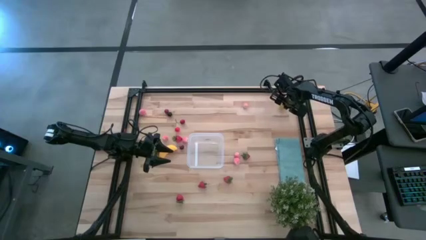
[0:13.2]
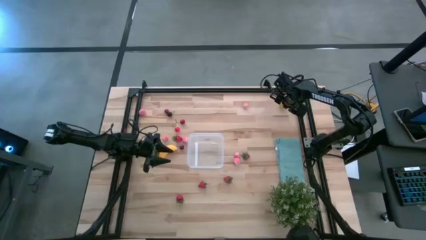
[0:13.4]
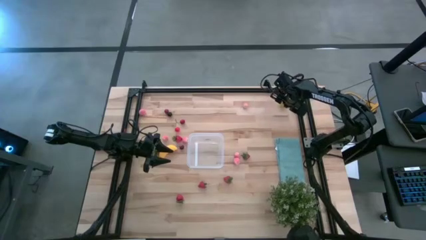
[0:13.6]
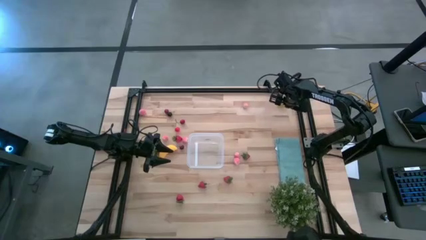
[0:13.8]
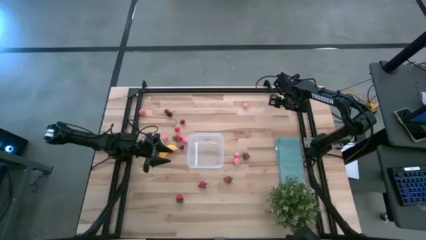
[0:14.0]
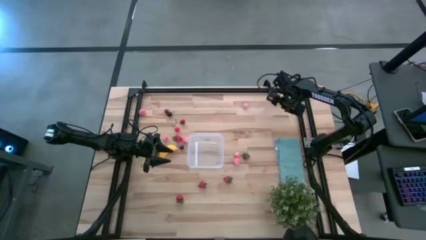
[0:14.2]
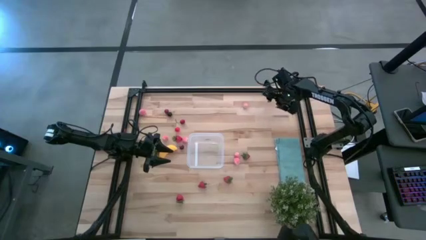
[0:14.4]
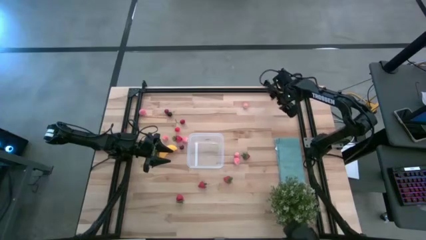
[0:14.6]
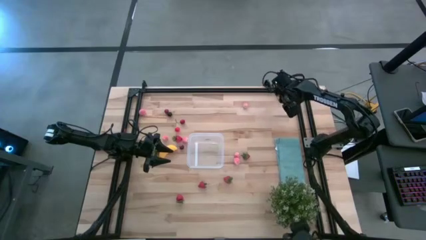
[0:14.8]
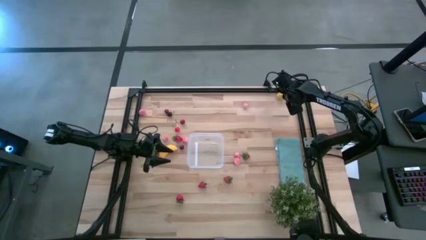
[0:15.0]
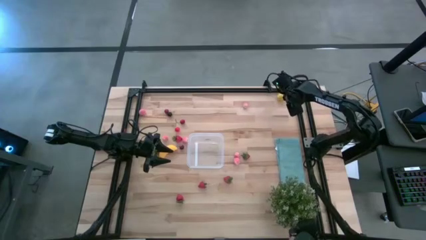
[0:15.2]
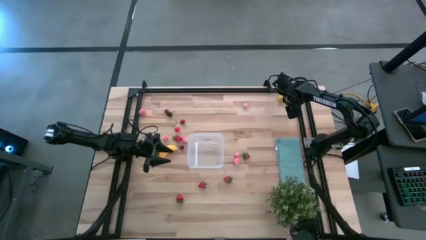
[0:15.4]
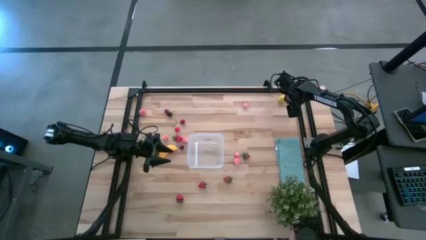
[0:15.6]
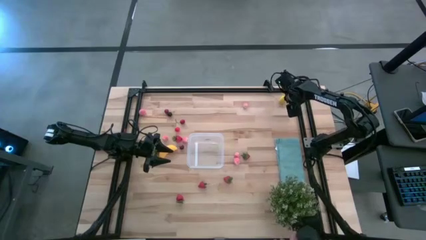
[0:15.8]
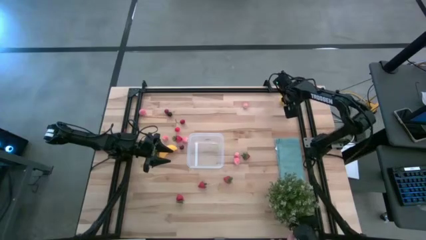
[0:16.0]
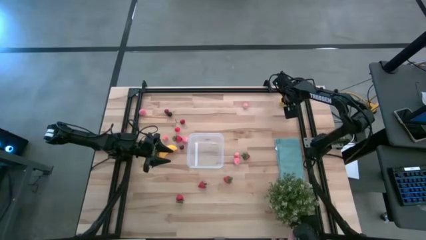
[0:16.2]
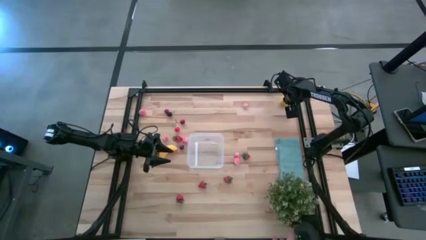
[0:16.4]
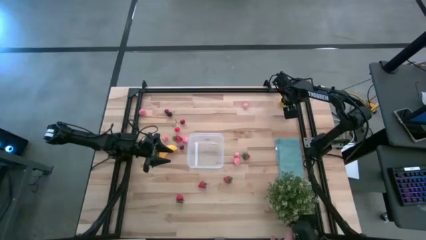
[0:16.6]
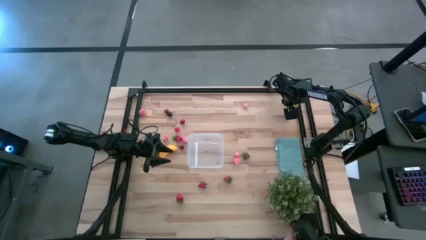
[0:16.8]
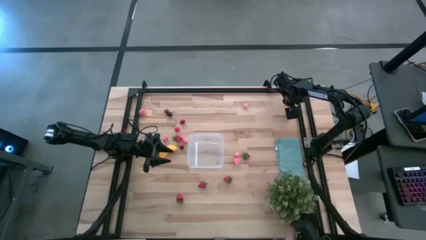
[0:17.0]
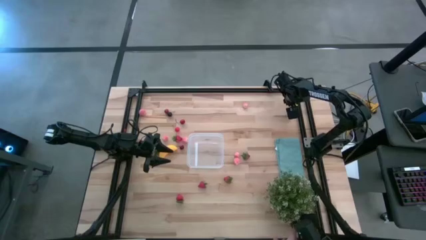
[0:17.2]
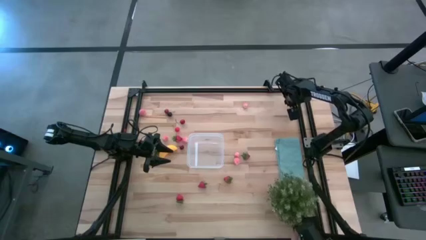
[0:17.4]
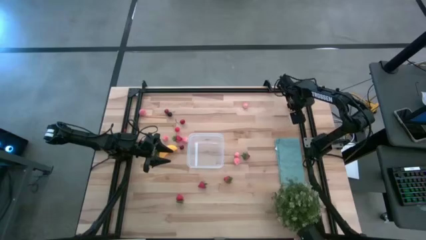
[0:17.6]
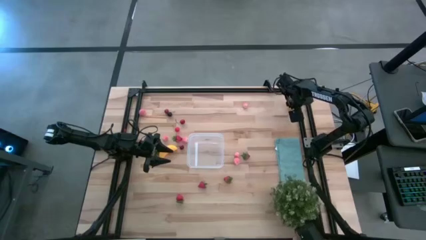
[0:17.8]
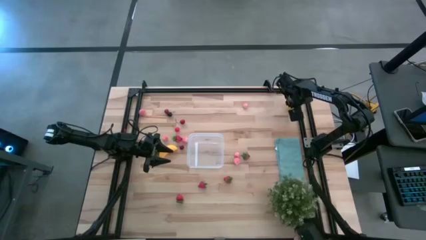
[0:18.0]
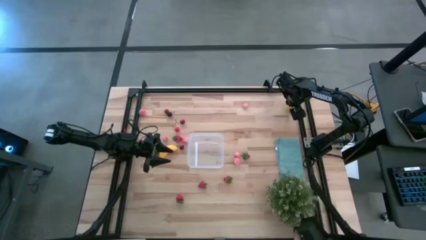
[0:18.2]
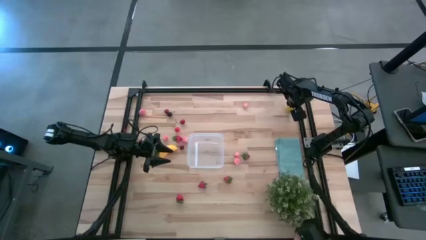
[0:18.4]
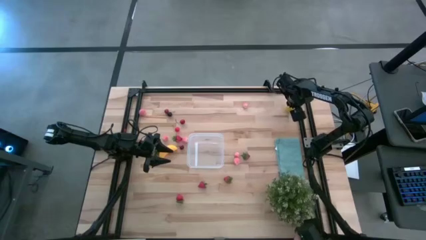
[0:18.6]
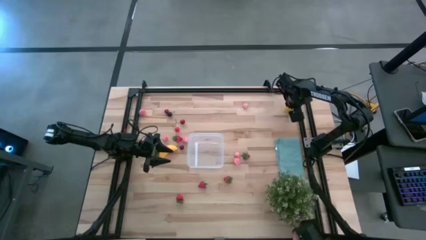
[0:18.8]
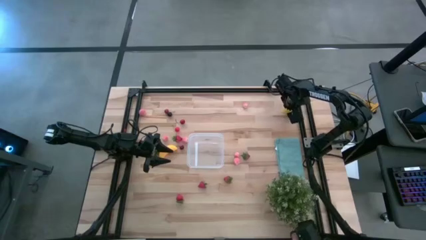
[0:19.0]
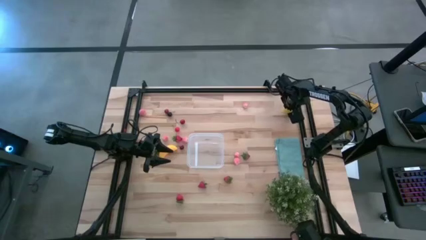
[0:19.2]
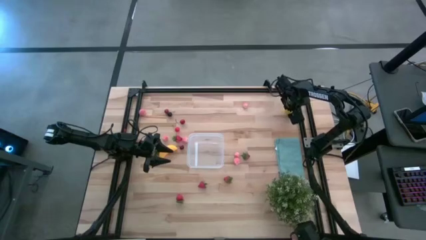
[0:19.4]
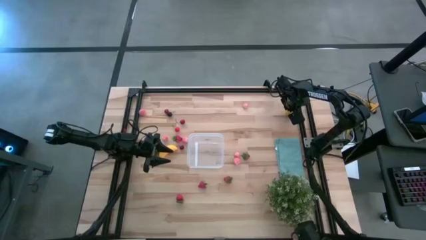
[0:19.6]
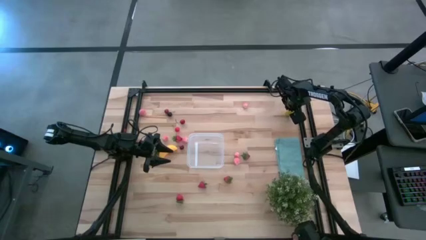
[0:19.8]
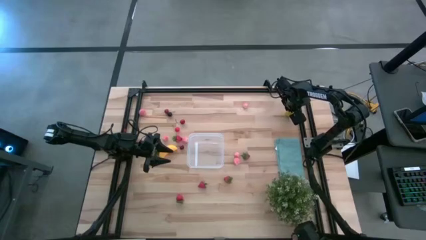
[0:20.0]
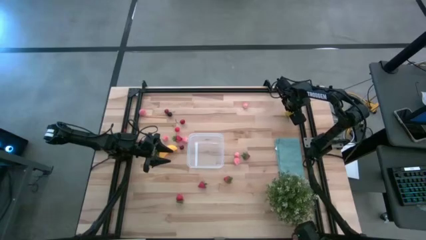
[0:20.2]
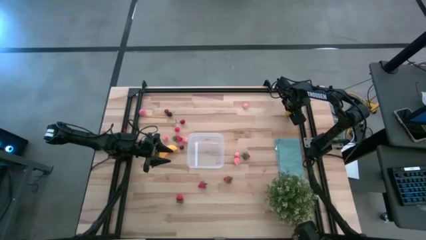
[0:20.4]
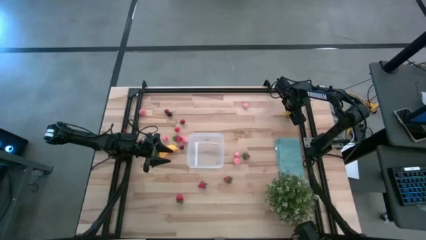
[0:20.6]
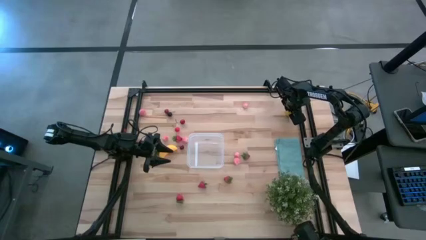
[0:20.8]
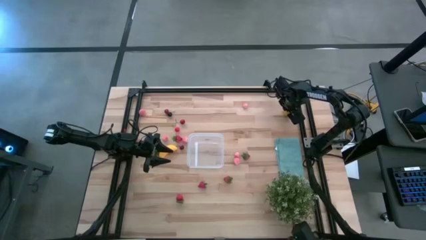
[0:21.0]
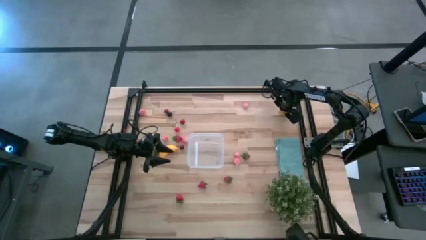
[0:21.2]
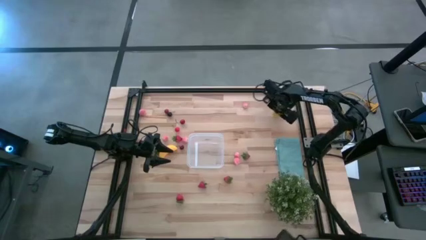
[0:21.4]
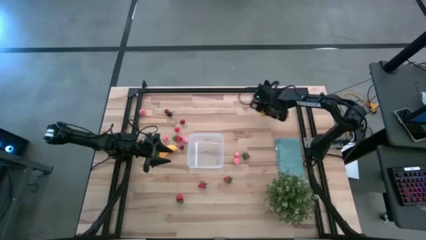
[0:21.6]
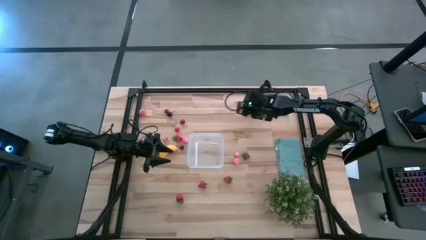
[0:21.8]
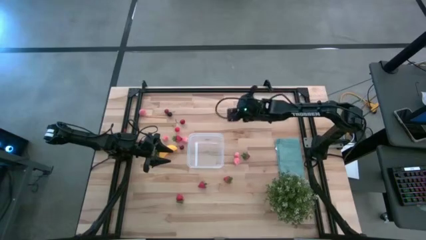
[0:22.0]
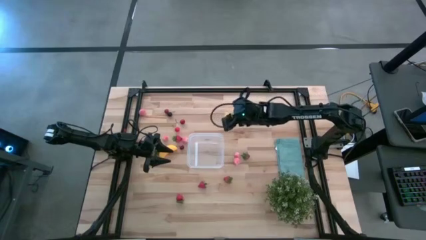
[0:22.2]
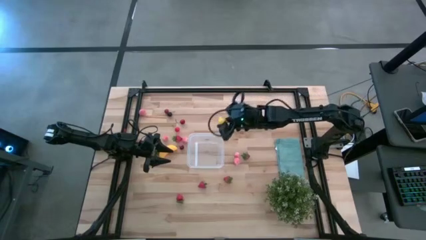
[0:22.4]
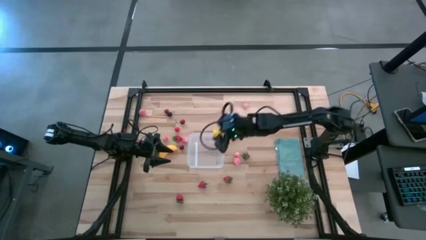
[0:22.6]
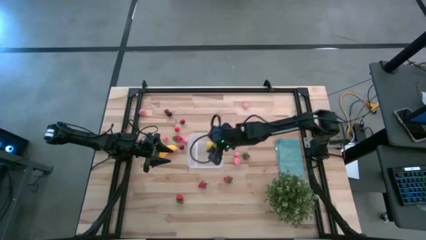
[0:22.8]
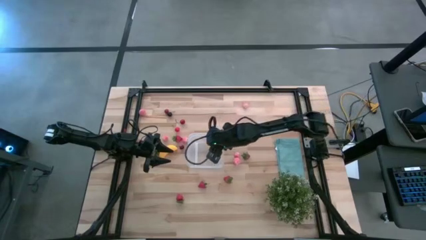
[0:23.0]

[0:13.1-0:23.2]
Task: Pick and placing Produce into tupperware
Put the lemon into the transparent bin

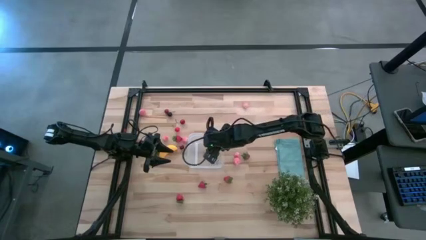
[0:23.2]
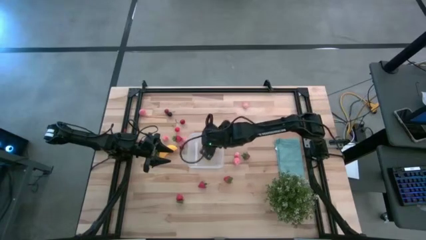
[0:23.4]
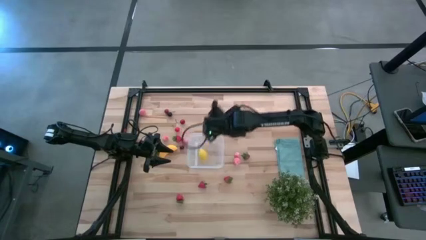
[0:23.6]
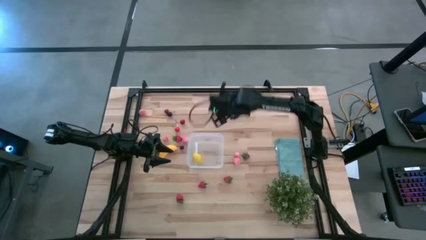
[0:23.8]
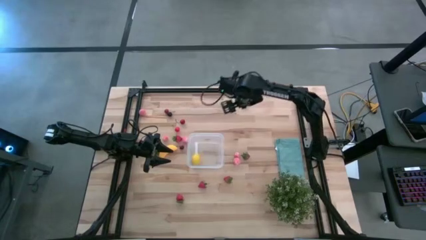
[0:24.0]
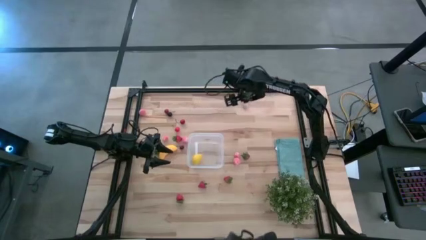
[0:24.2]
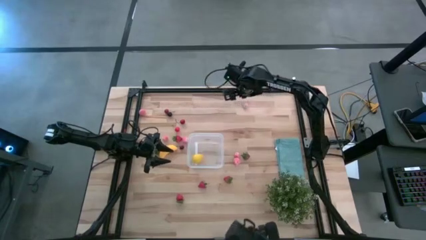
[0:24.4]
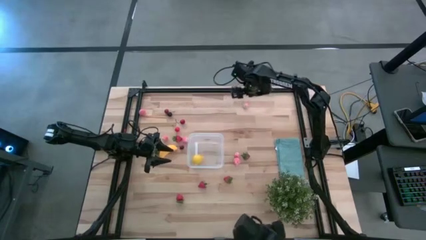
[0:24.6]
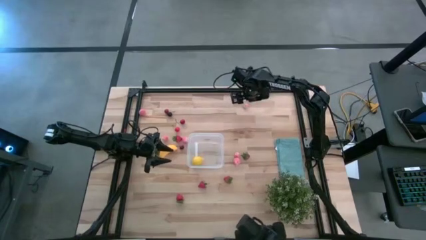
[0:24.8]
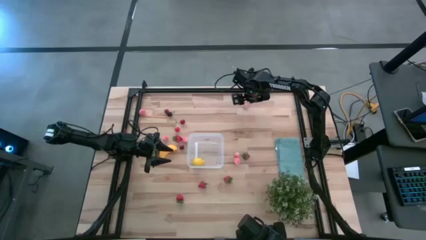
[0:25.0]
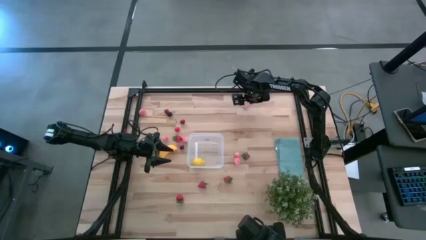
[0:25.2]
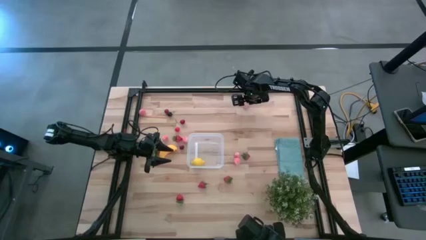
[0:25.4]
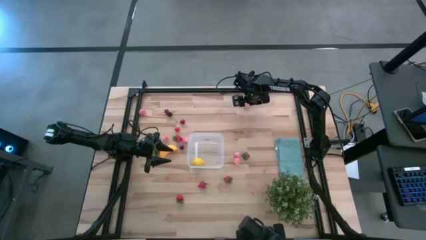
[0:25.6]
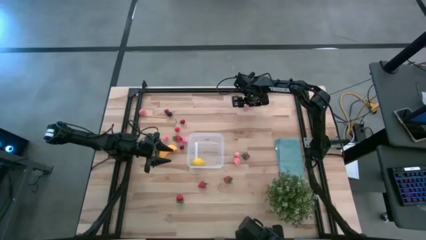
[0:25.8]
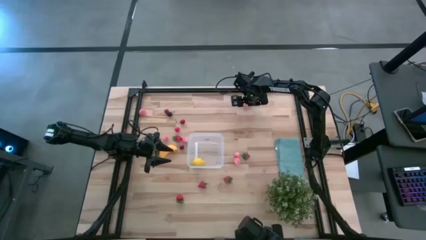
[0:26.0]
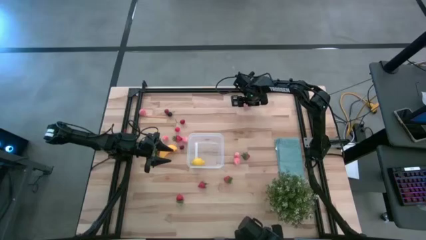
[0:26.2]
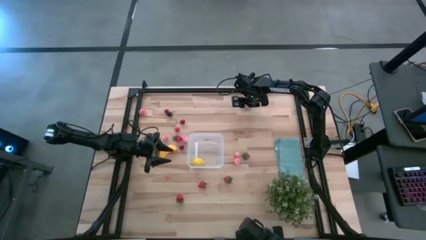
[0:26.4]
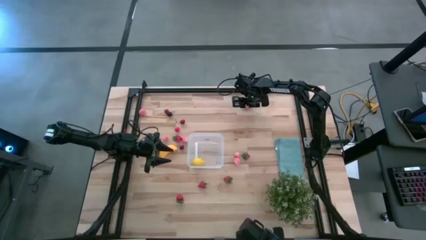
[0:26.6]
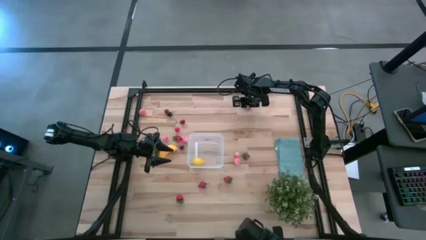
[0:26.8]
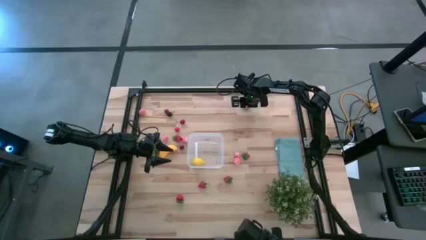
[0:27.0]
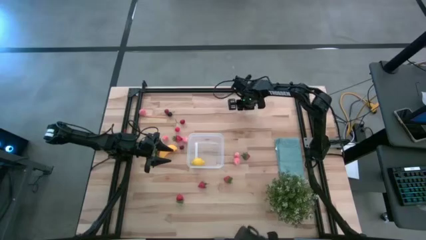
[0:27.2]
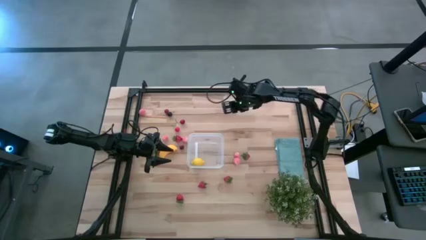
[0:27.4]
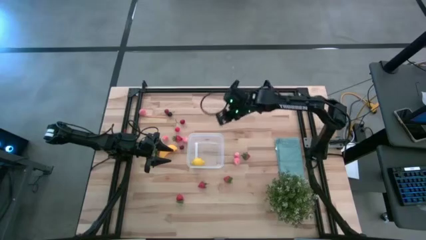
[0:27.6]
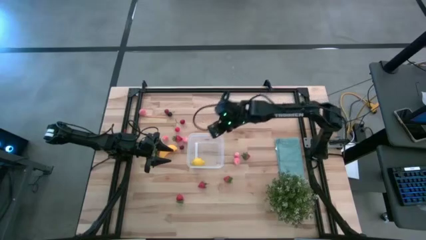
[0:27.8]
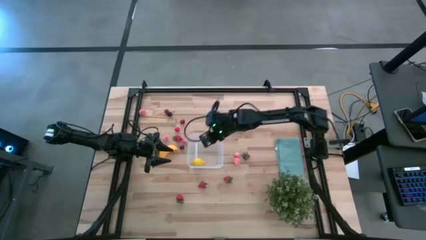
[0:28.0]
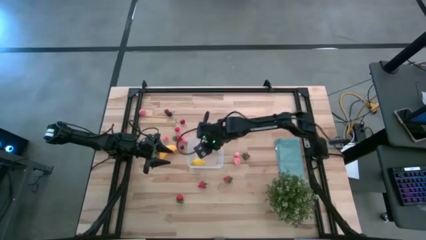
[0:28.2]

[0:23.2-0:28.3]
Put the peach into the transparent bin
